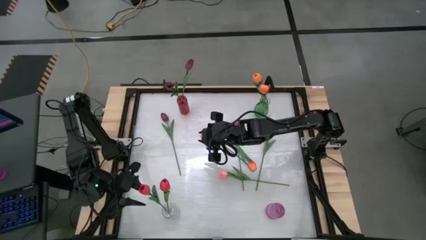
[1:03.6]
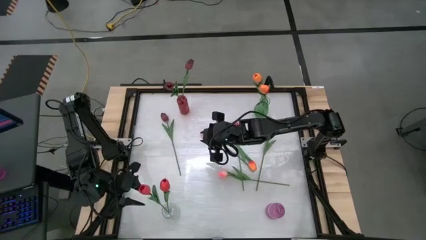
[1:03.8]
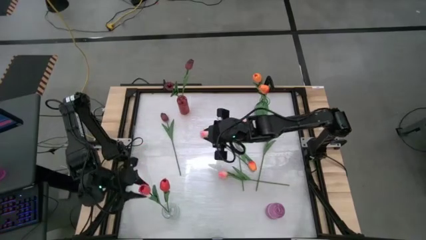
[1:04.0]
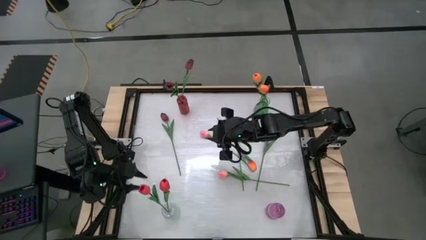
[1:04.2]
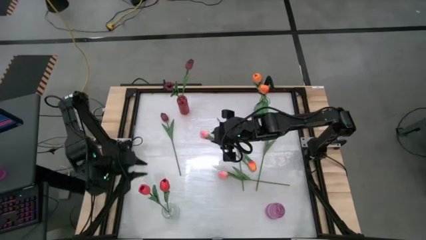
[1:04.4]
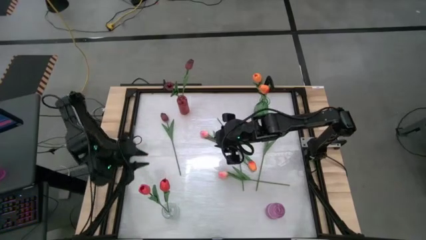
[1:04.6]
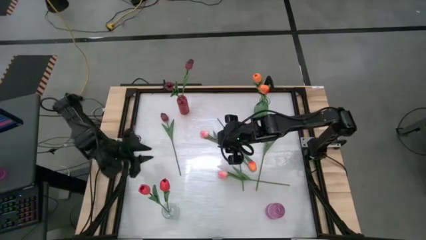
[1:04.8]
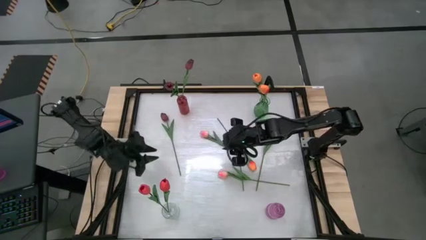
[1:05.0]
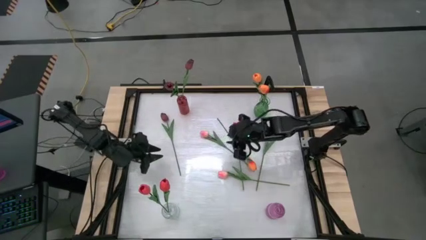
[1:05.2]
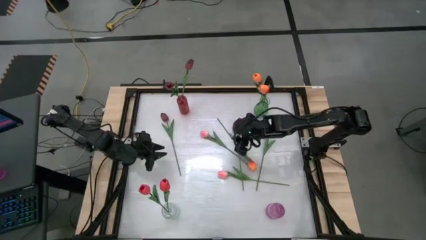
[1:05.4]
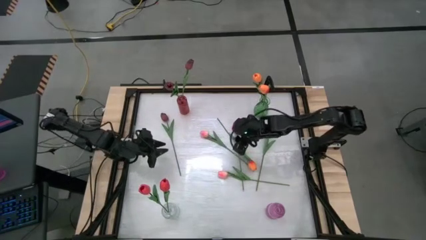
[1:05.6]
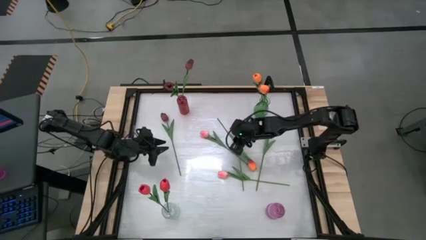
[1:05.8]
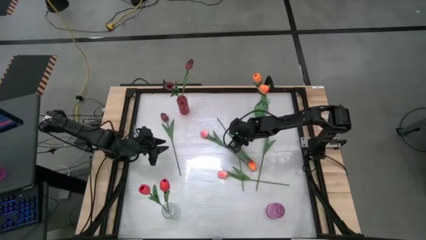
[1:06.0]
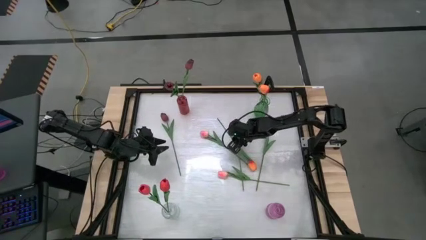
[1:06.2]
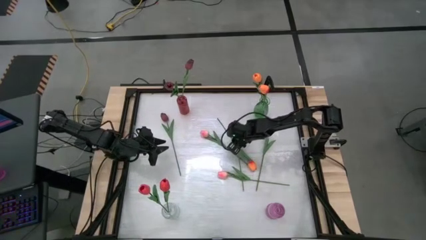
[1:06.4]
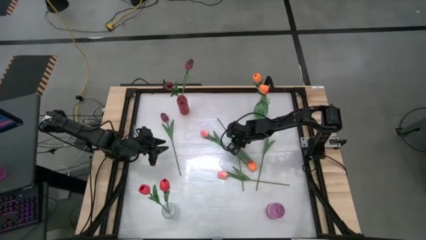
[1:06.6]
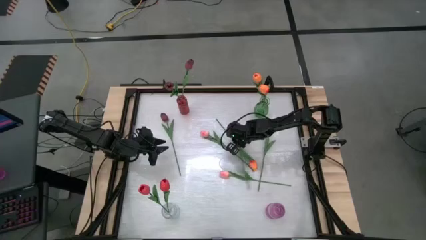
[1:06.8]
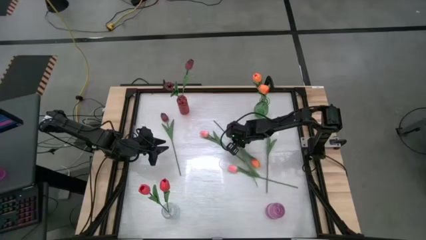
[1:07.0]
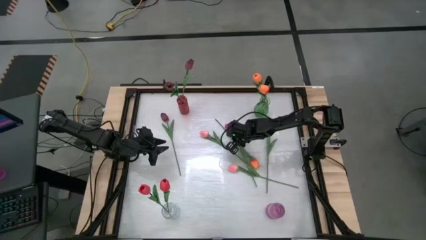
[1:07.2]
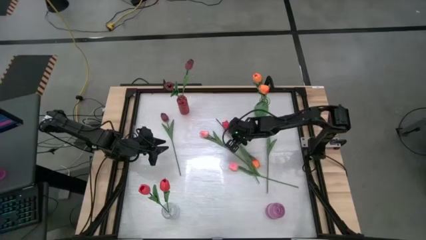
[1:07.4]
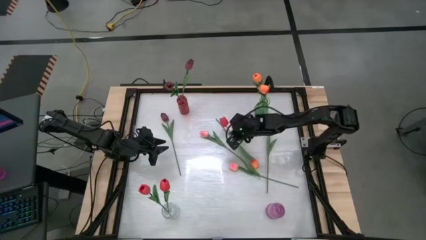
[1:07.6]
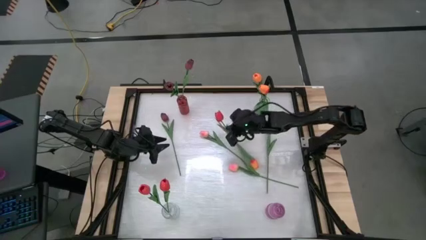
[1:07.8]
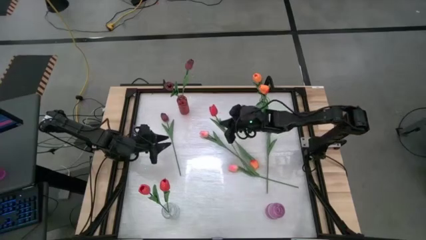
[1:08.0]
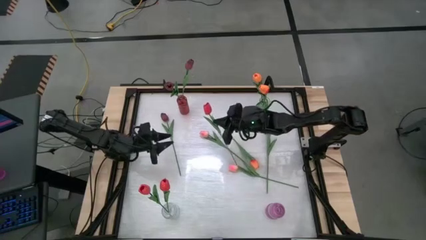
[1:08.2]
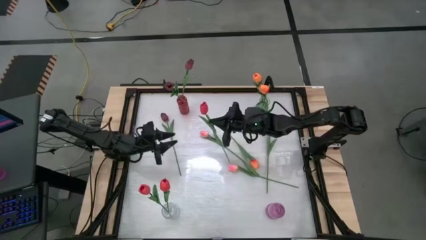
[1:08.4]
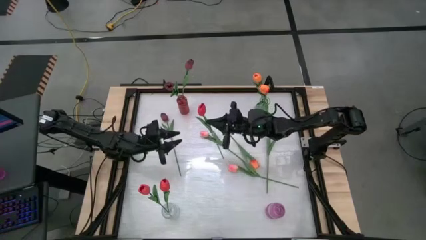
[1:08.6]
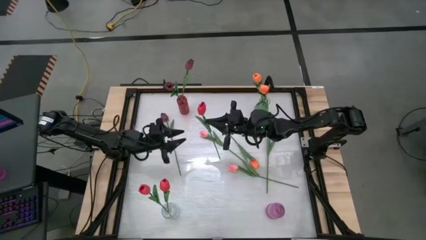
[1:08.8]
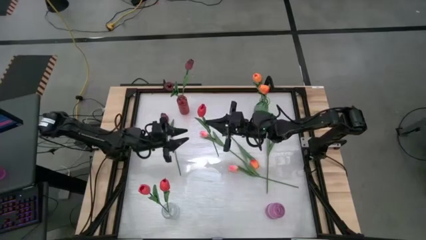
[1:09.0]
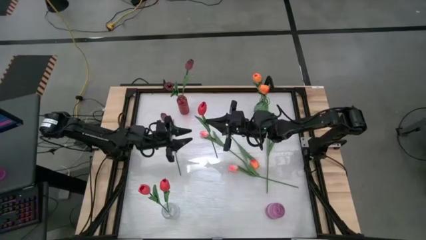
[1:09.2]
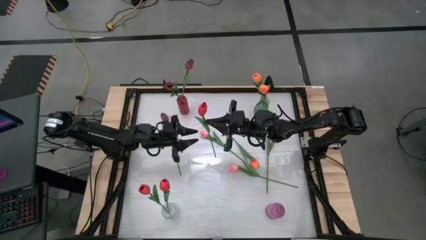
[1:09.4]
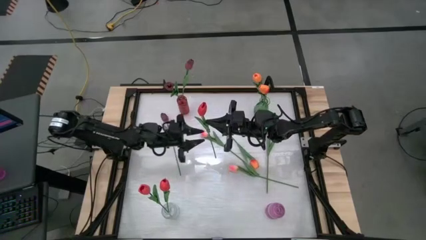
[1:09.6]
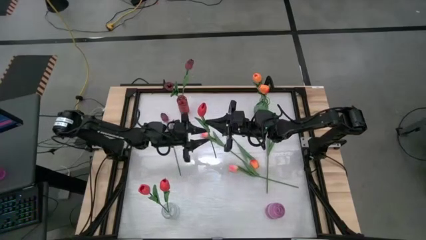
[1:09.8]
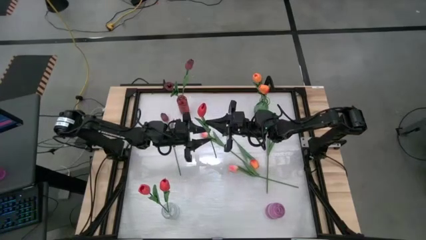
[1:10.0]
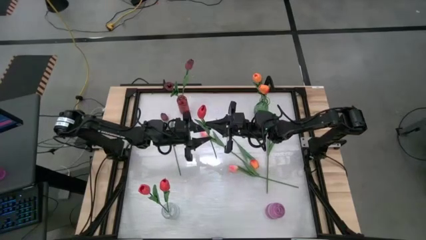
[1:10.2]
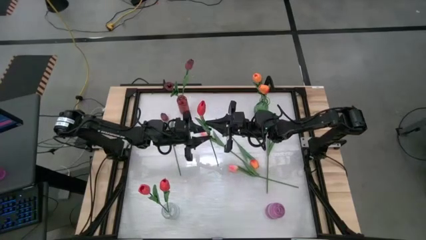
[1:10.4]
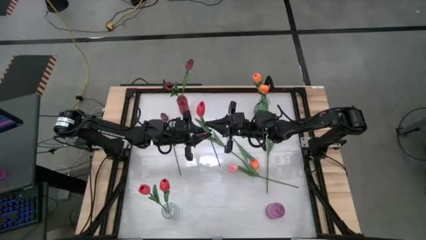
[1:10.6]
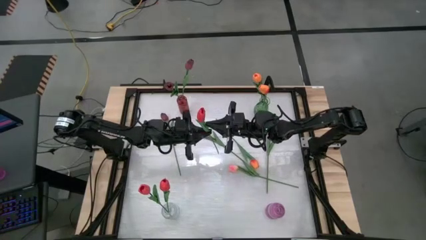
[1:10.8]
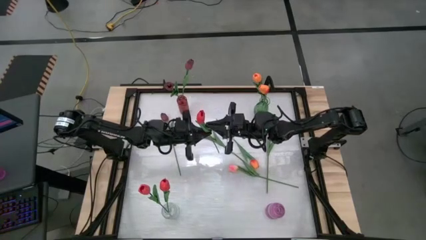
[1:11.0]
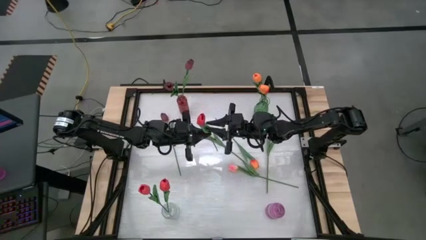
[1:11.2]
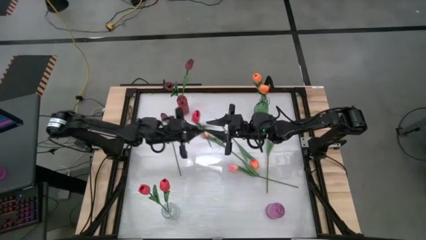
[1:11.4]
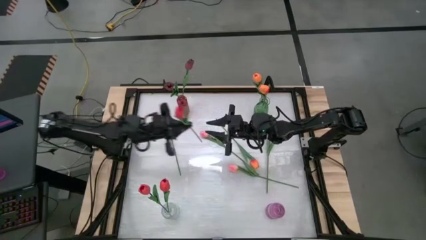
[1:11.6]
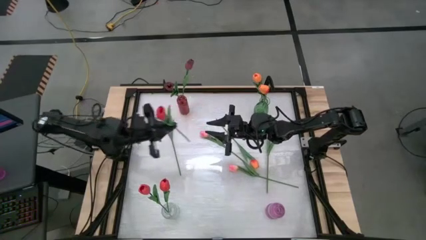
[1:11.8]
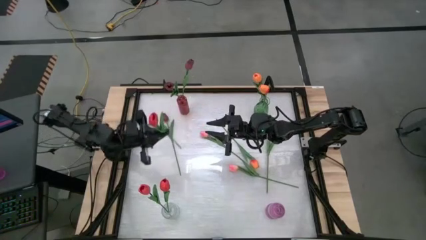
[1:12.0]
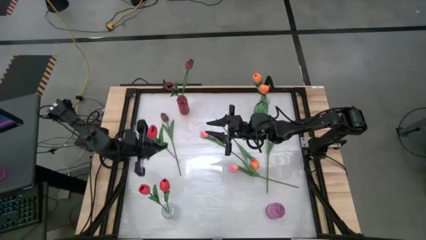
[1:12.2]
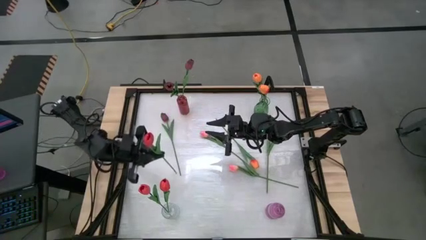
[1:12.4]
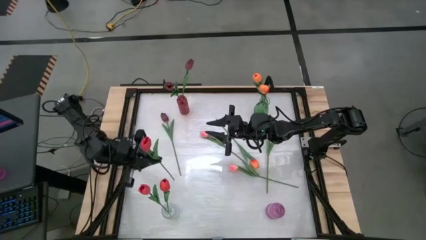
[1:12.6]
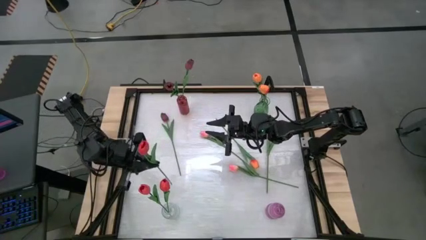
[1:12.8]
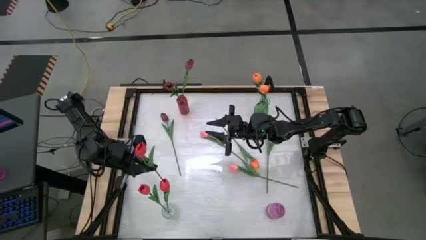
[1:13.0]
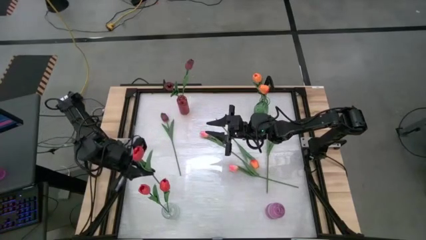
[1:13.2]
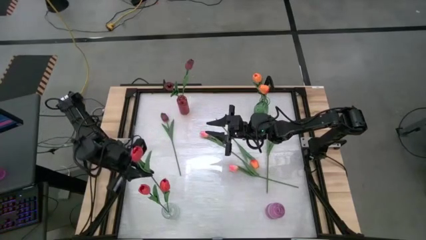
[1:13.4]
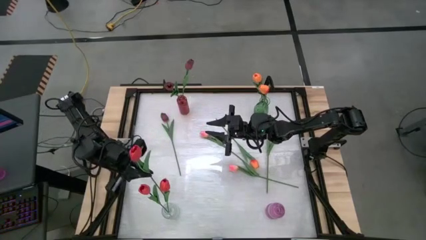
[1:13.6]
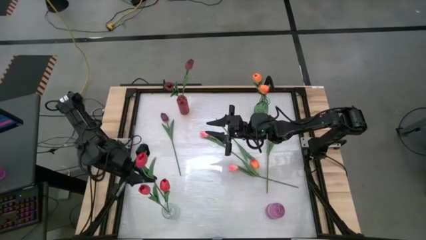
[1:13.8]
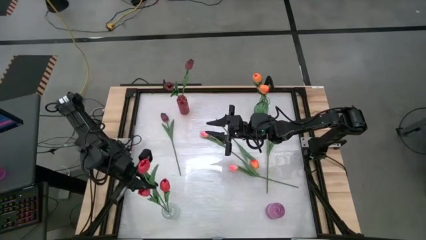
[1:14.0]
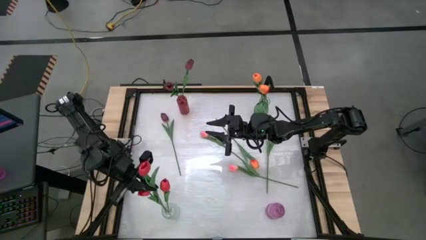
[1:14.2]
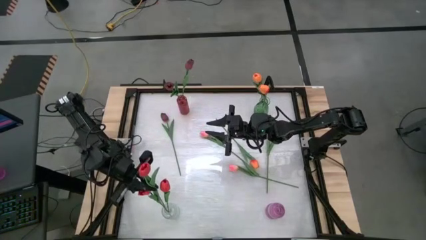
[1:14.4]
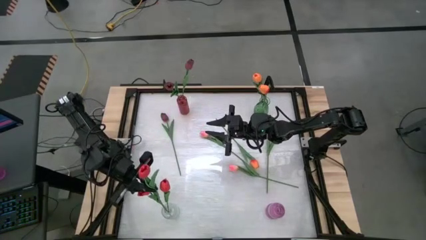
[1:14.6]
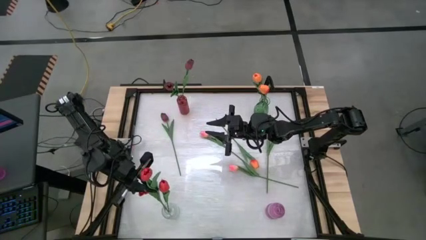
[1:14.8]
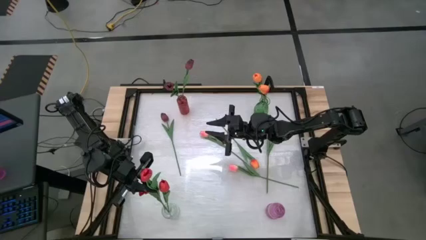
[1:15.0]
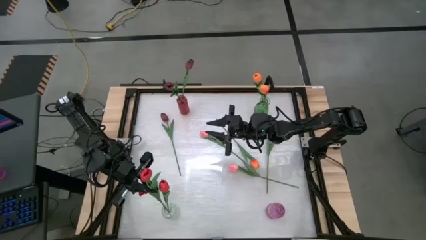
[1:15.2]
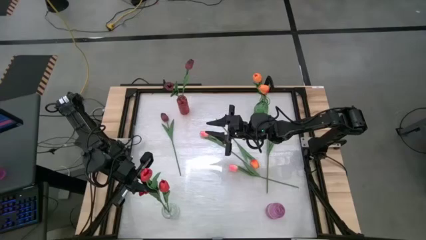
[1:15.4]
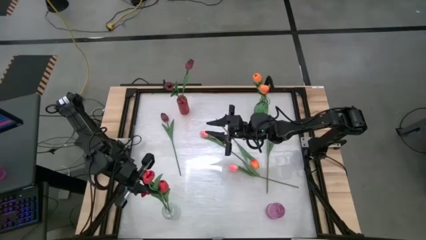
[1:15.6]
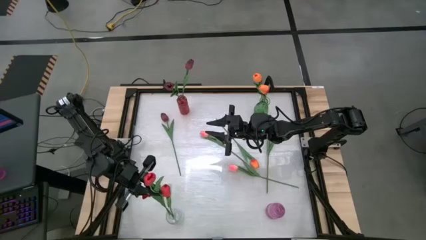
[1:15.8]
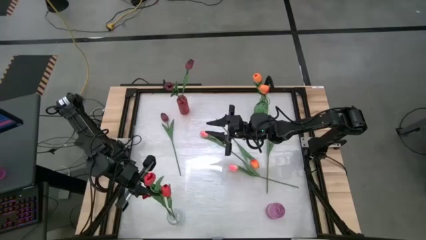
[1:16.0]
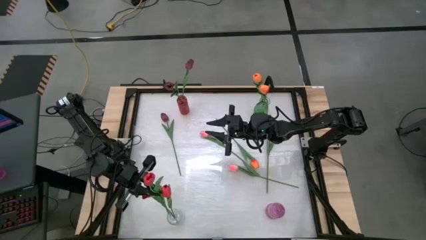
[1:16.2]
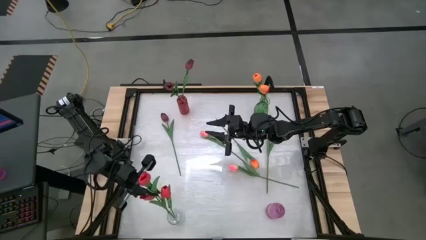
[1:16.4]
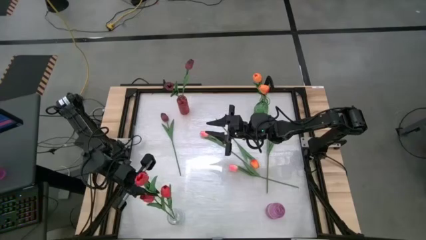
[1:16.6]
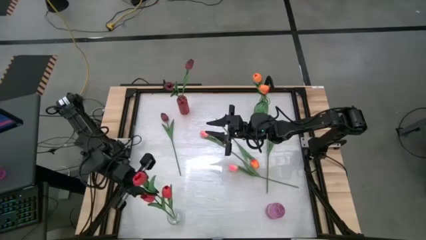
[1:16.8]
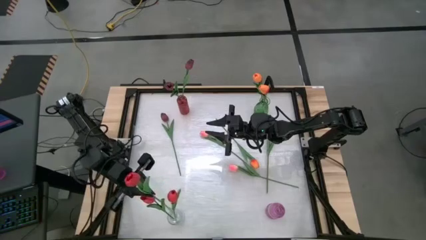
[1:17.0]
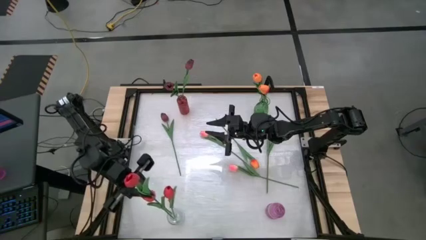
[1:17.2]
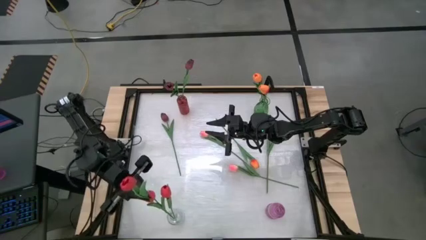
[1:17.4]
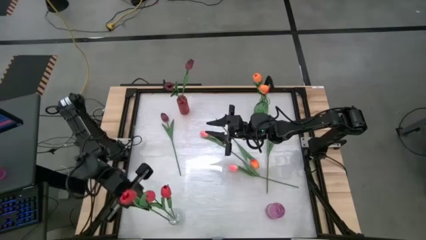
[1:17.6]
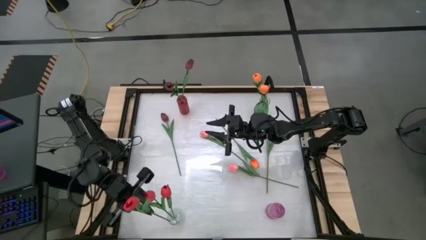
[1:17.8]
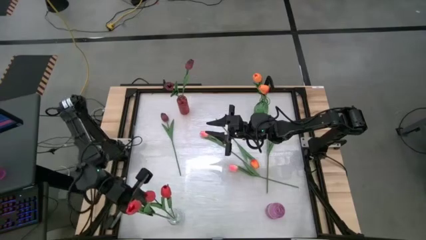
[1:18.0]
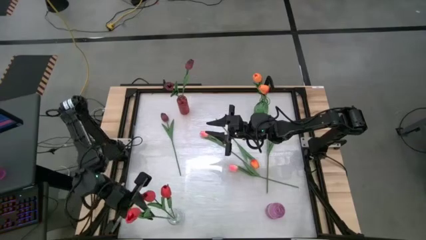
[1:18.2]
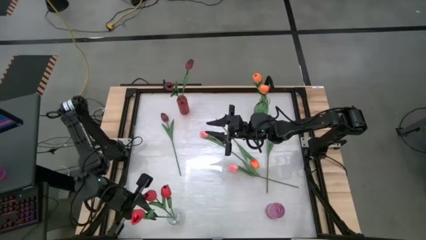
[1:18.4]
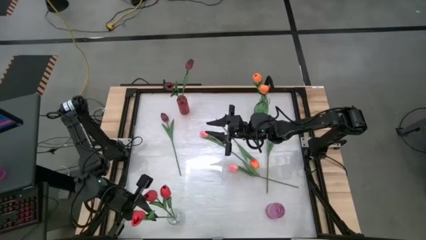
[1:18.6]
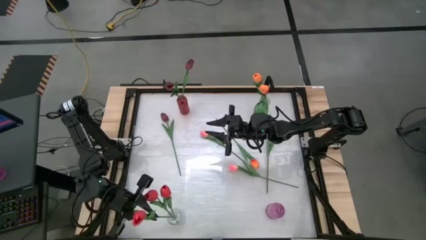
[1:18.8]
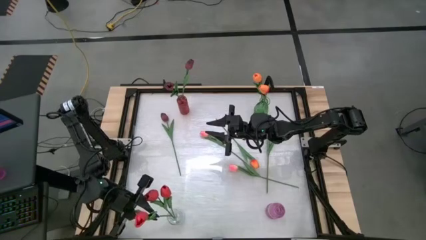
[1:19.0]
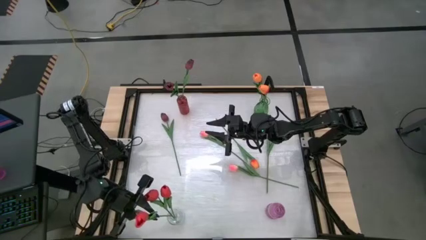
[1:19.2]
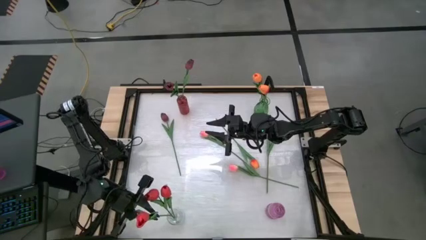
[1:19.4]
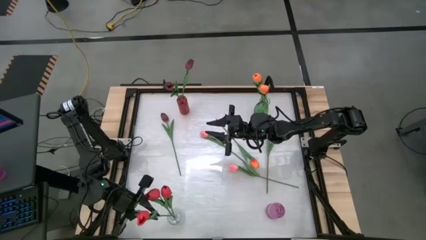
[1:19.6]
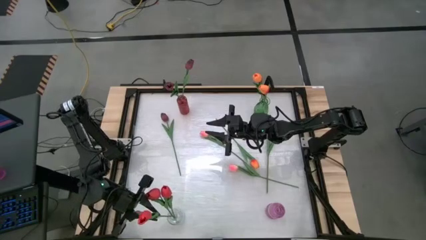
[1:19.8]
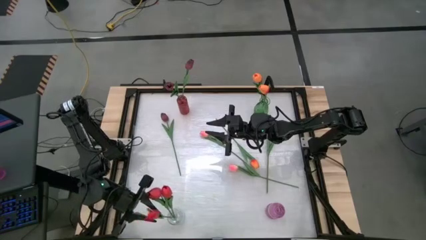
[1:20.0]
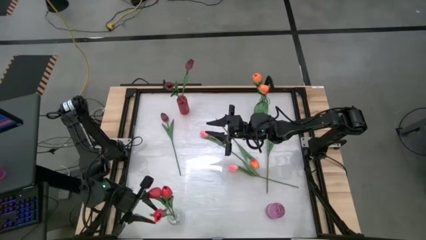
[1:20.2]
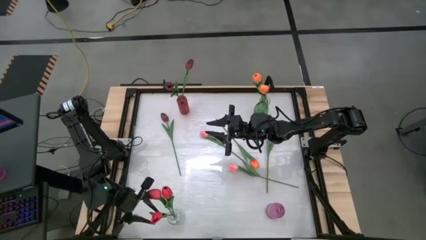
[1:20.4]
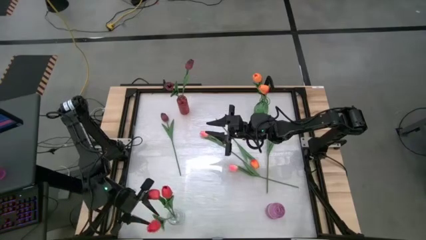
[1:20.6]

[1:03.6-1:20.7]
Task: Sort flowers into vase by color
Put the red flower into the transparent vase
